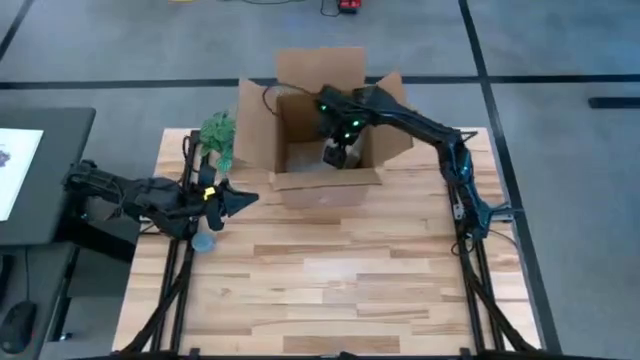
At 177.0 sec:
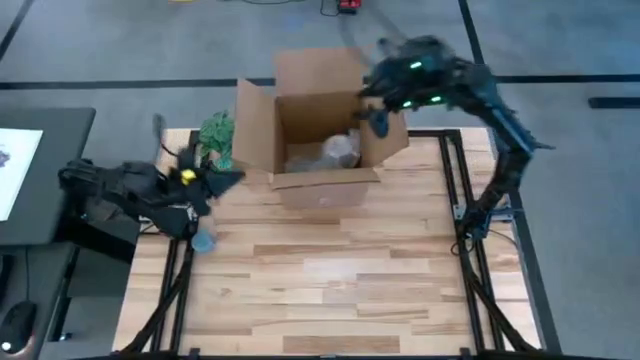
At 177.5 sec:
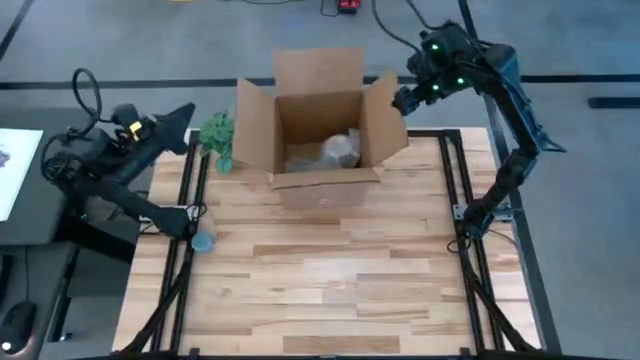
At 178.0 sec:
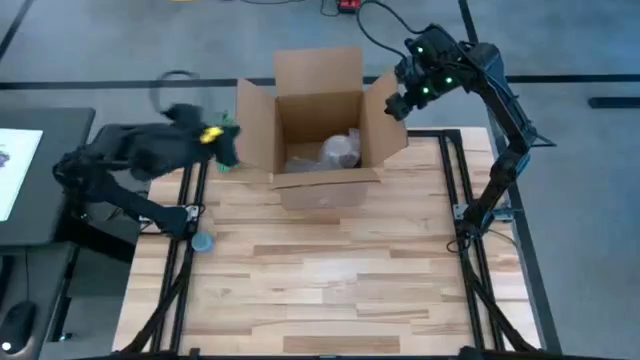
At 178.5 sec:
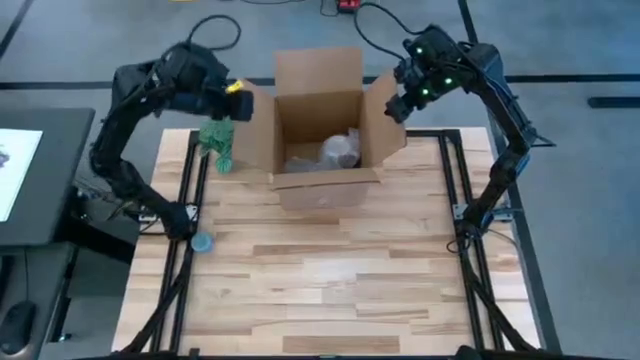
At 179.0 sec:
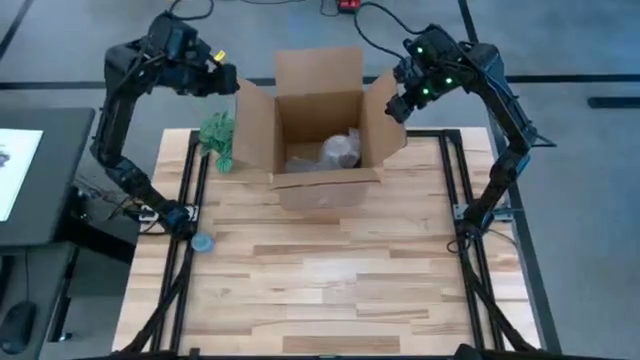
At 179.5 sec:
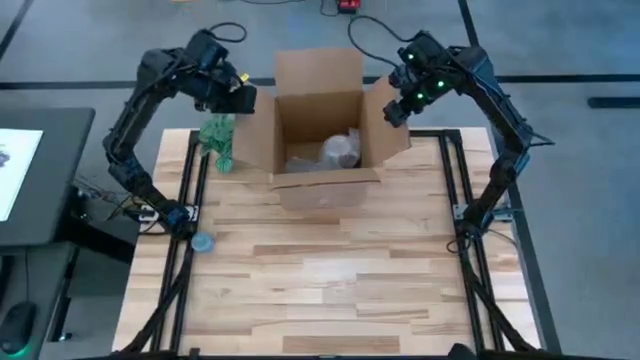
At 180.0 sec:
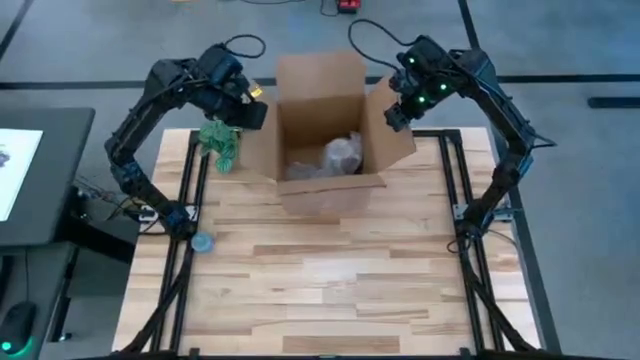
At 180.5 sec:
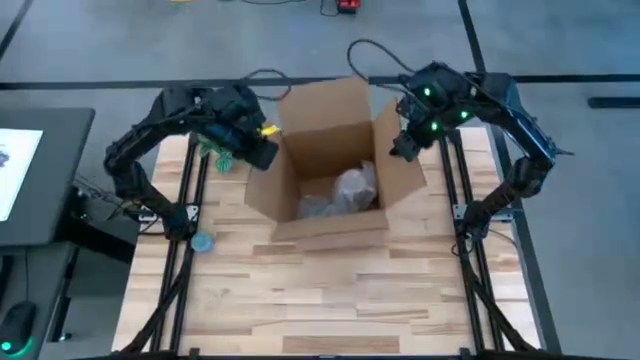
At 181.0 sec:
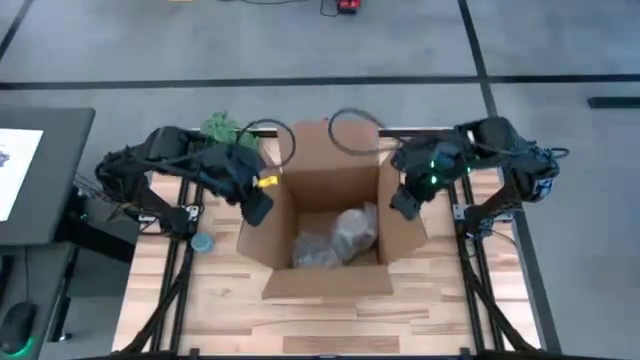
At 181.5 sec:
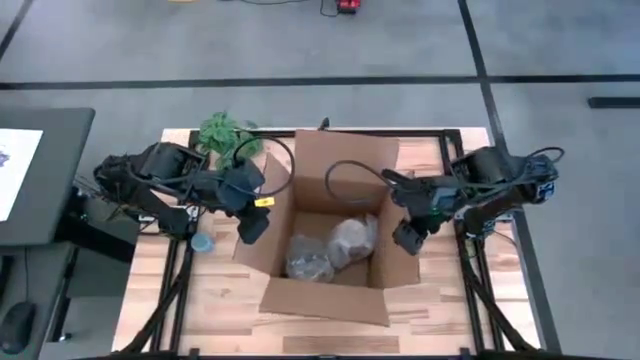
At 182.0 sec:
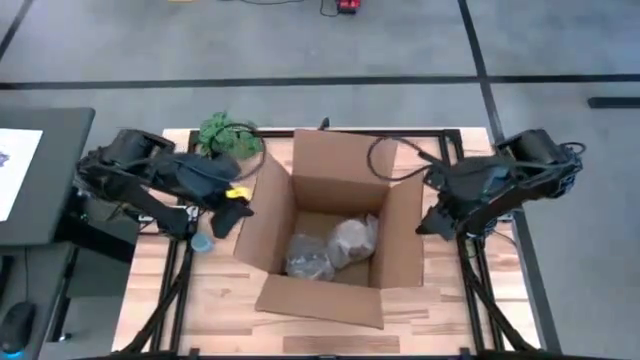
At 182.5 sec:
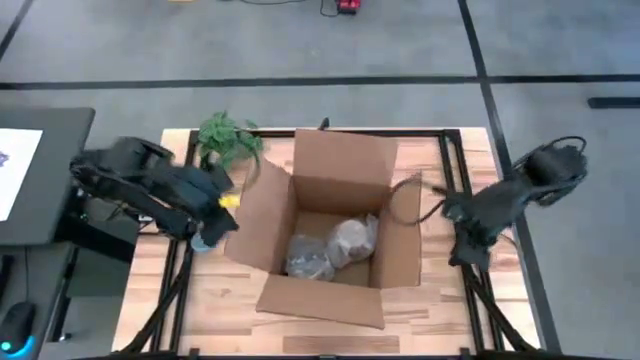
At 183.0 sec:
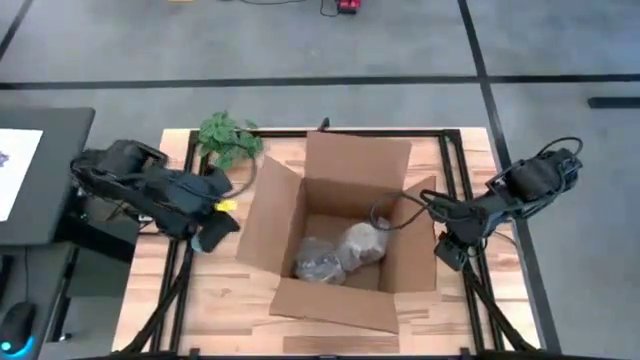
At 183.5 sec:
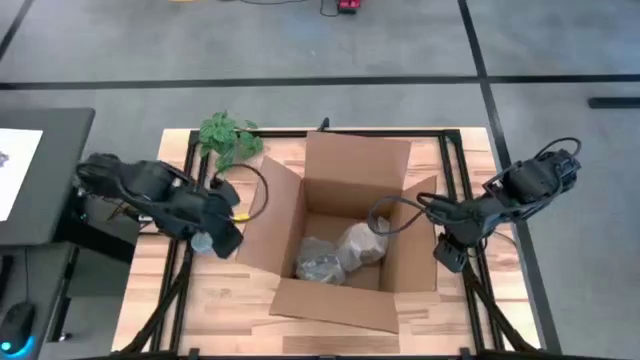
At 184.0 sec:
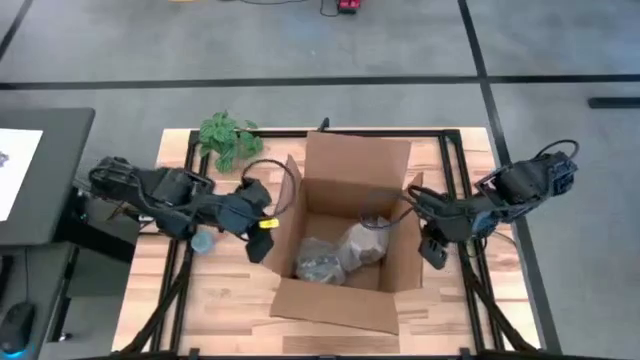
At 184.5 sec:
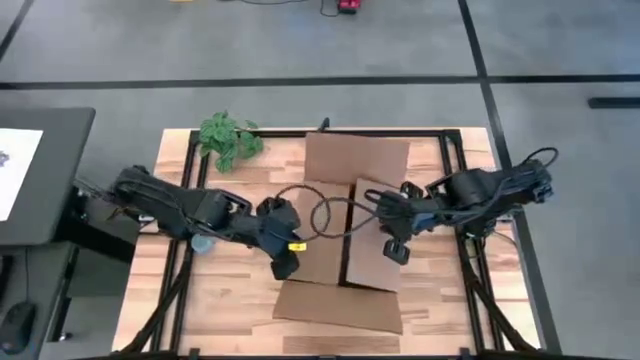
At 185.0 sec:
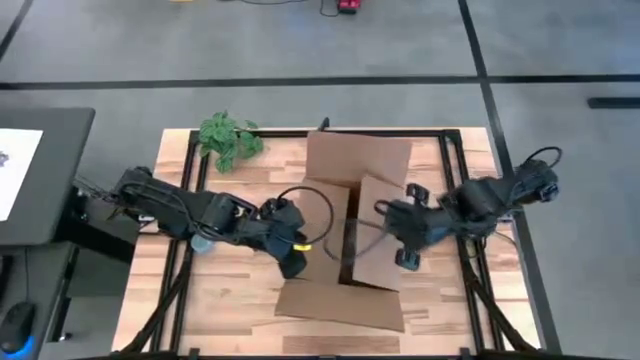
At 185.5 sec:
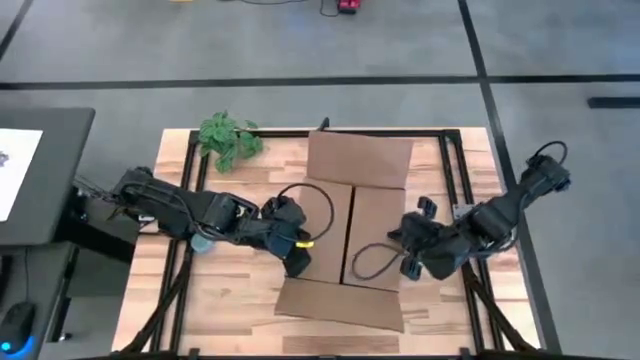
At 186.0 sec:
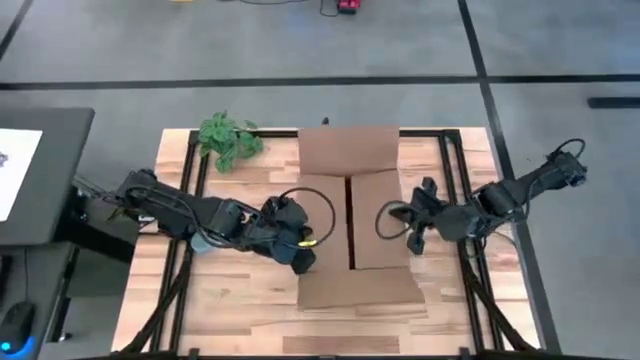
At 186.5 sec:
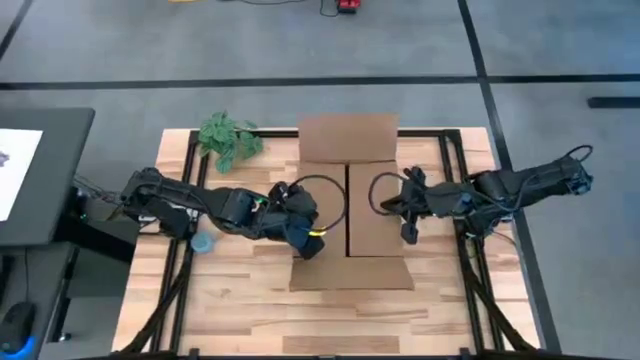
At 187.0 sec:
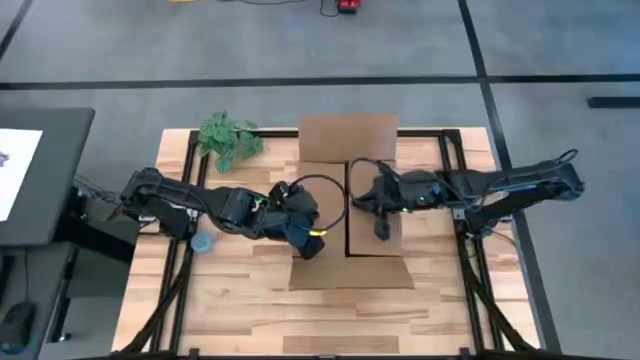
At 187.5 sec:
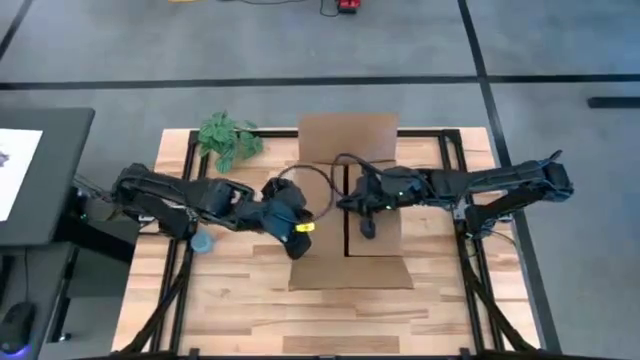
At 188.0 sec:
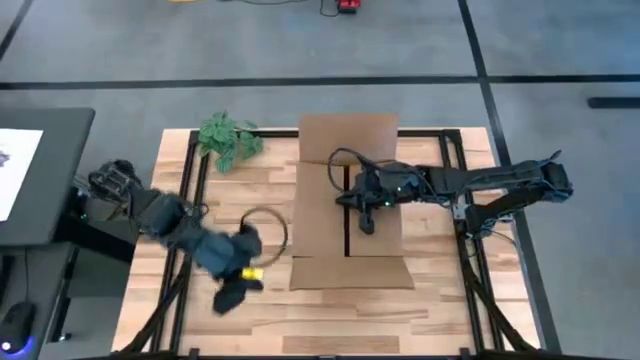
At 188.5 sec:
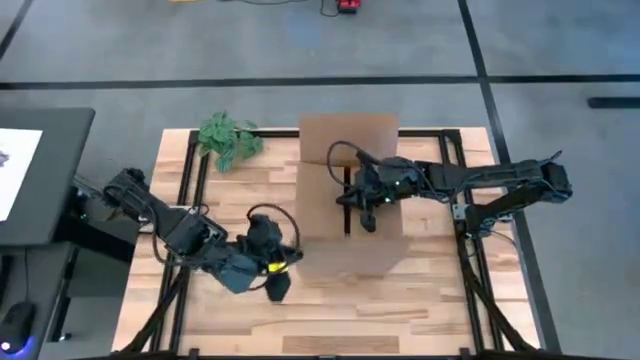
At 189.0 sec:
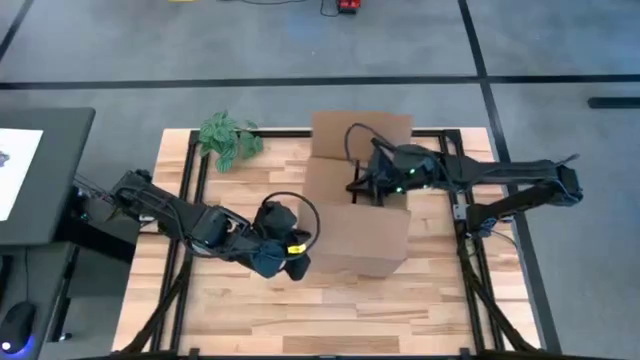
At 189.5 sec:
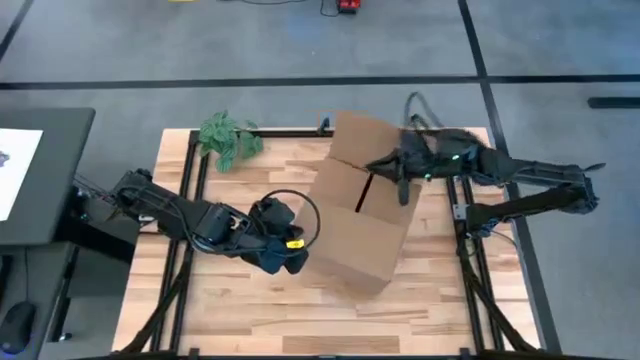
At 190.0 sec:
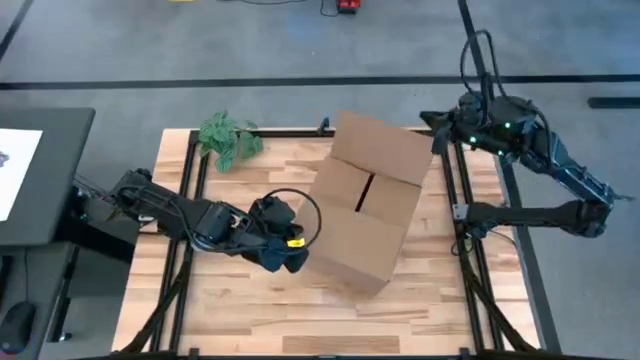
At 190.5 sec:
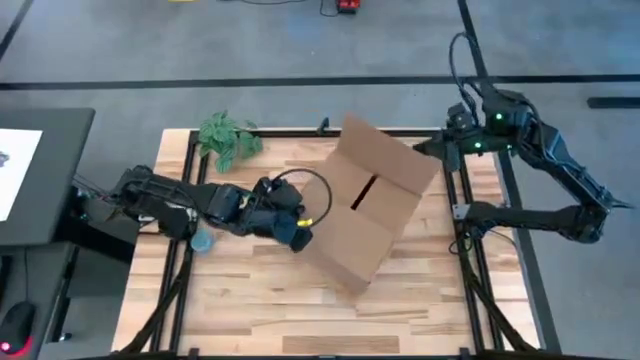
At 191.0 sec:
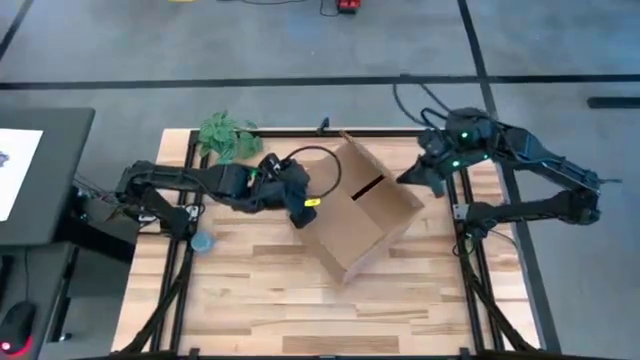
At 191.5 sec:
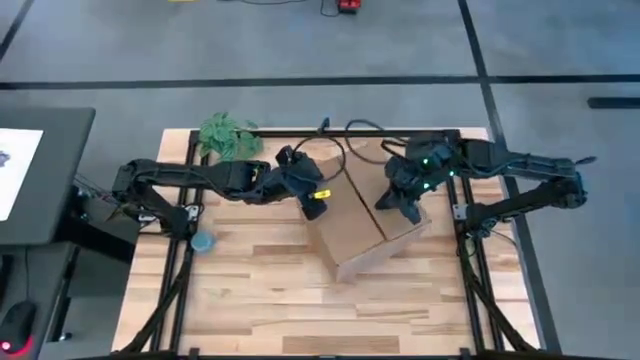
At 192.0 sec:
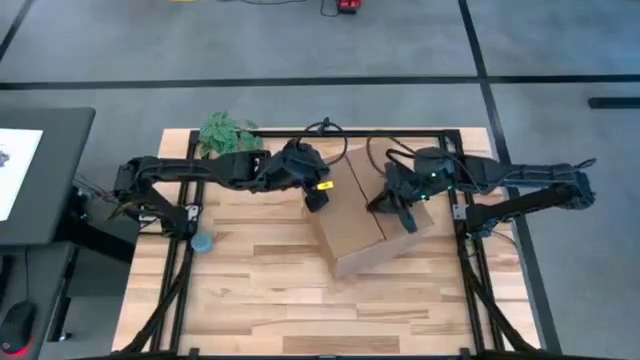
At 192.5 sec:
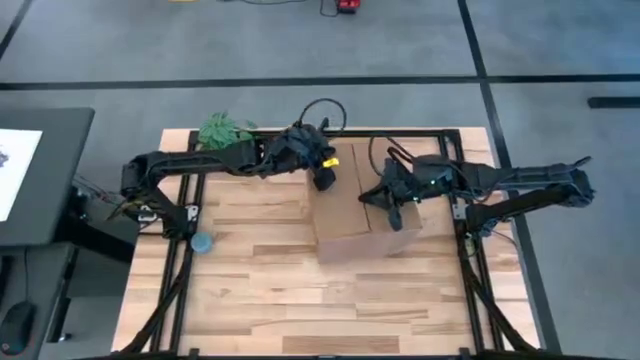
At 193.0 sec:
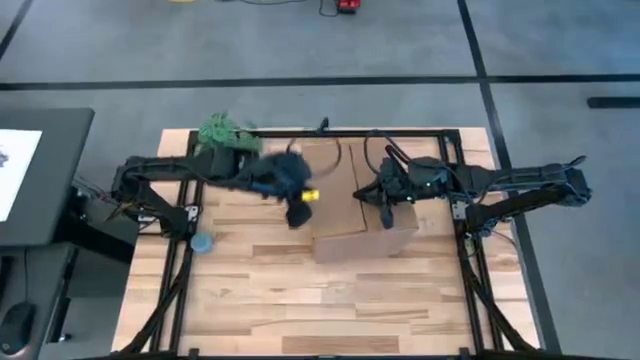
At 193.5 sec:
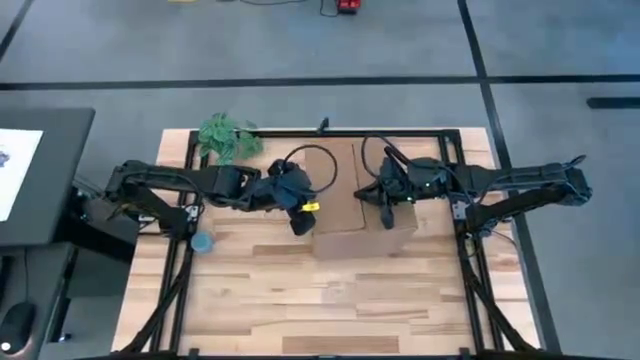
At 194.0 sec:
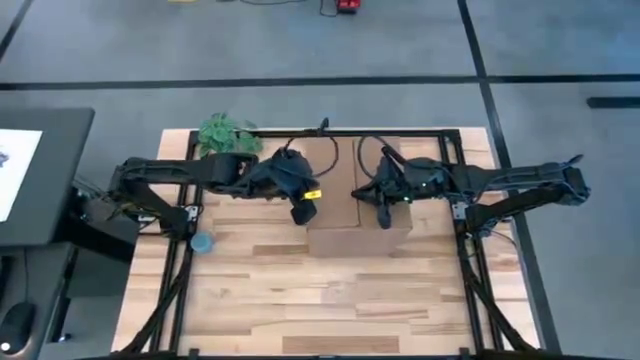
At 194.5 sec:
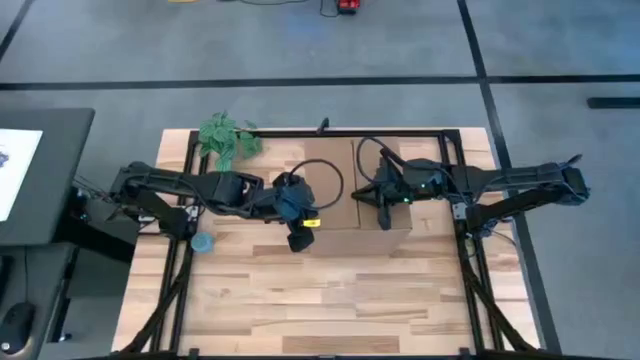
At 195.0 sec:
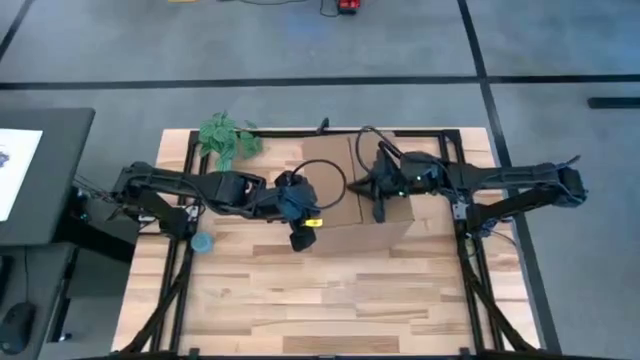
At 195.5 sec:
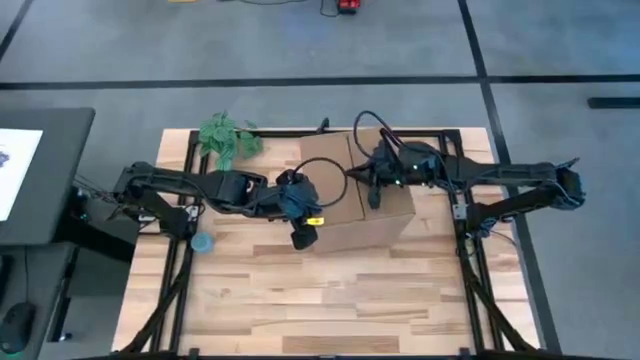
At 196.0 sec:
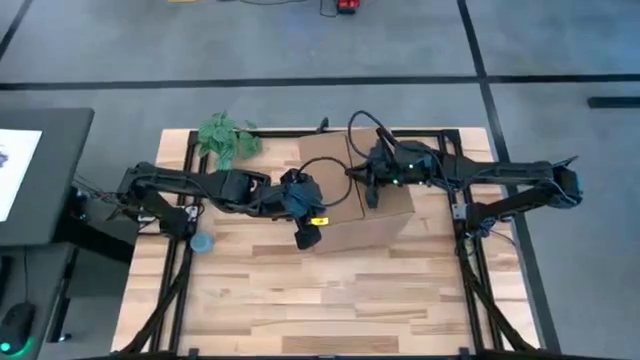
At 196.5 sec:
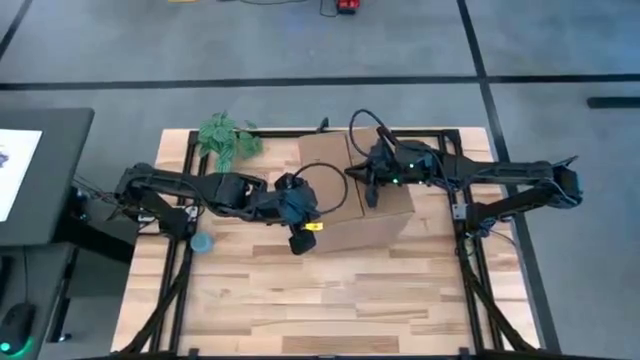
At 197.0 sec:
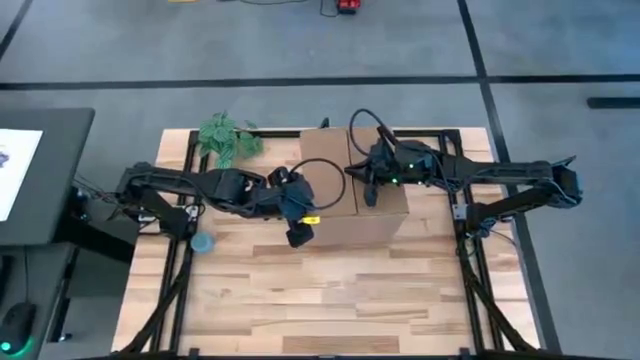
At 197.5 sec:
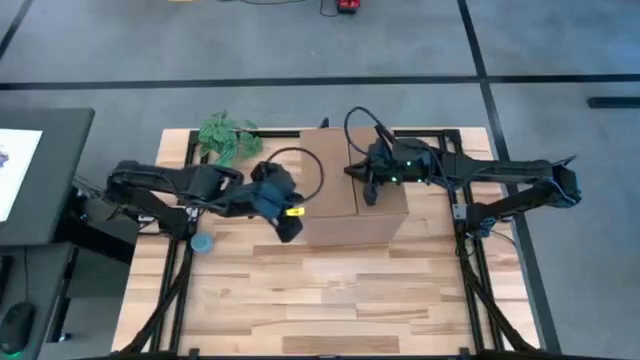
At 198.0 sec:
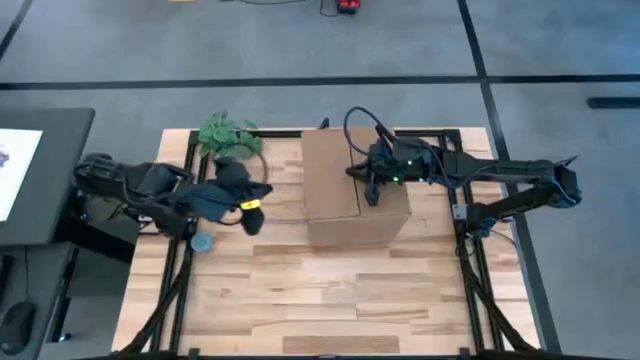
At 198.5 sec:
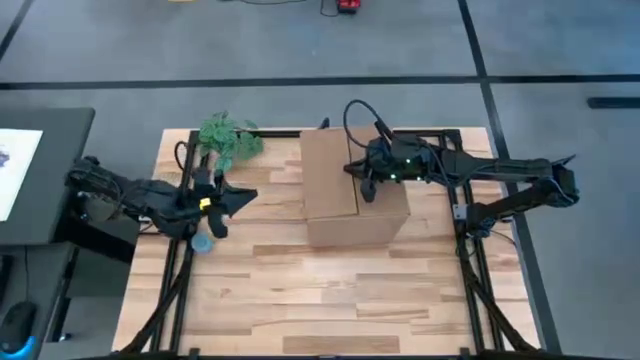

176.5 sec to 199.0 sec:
Task: wrap mug
Close the box
